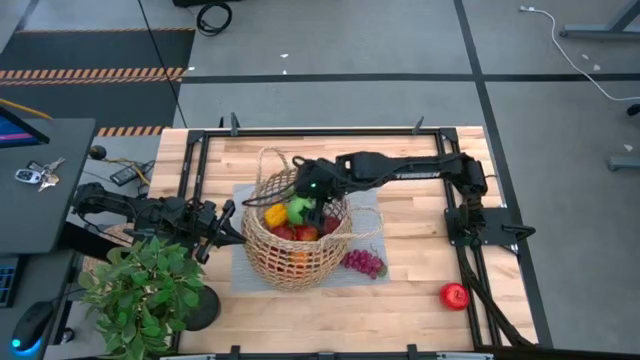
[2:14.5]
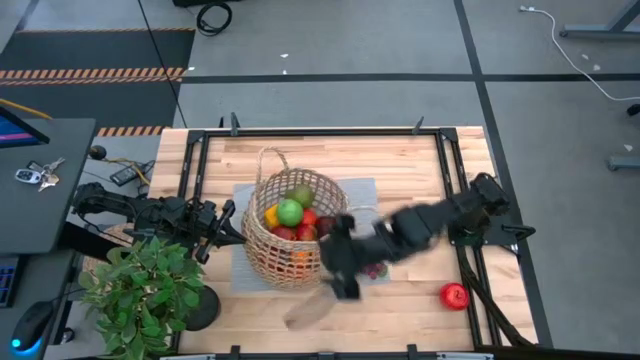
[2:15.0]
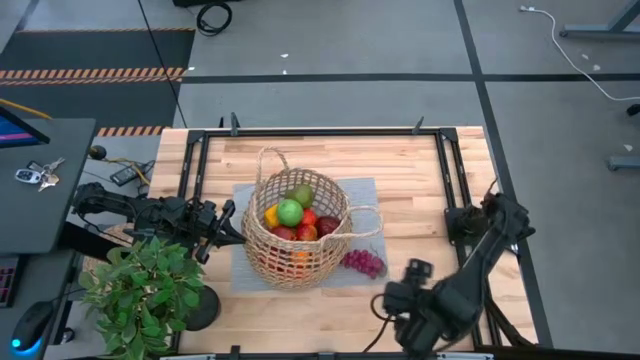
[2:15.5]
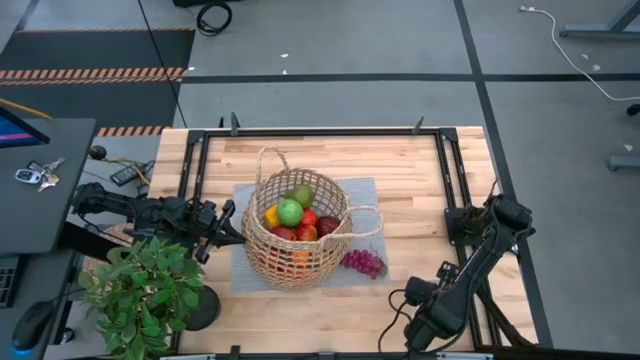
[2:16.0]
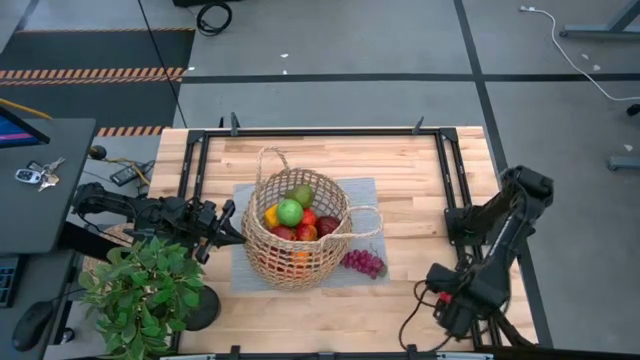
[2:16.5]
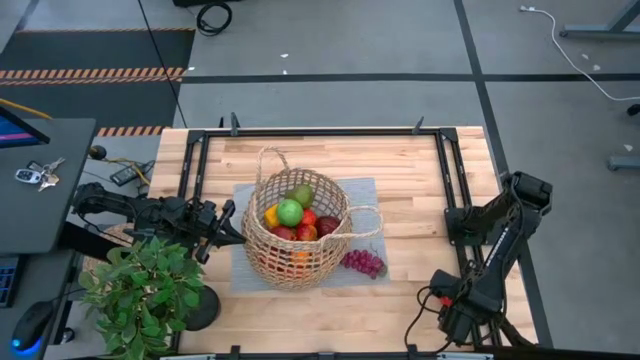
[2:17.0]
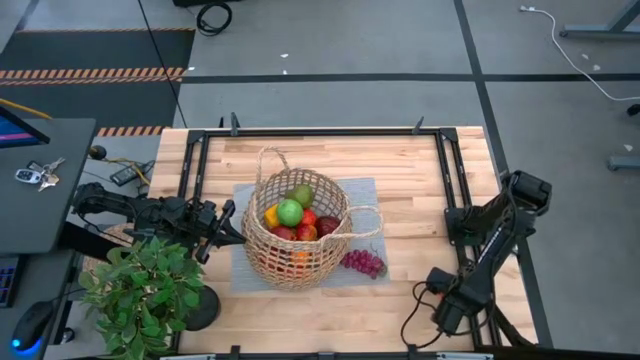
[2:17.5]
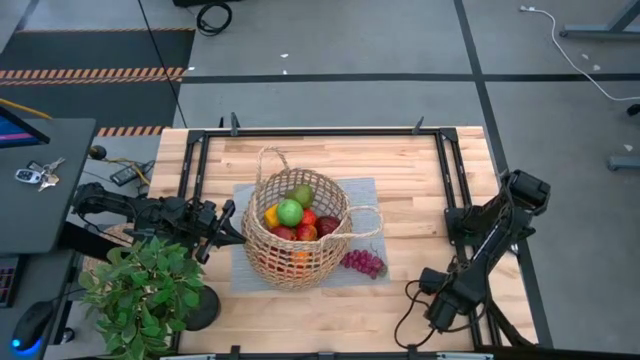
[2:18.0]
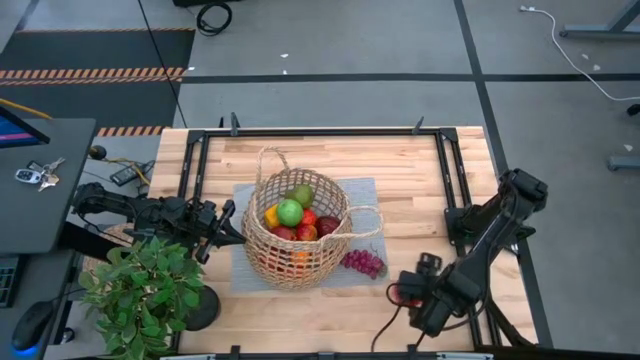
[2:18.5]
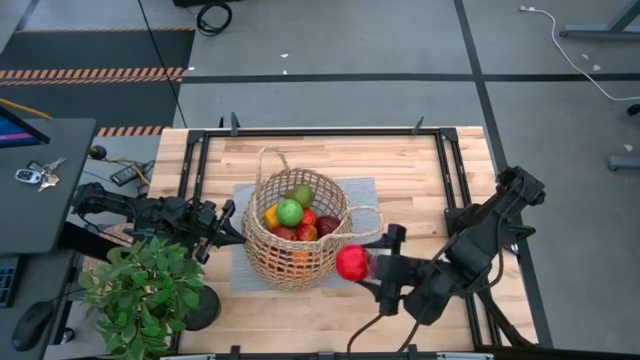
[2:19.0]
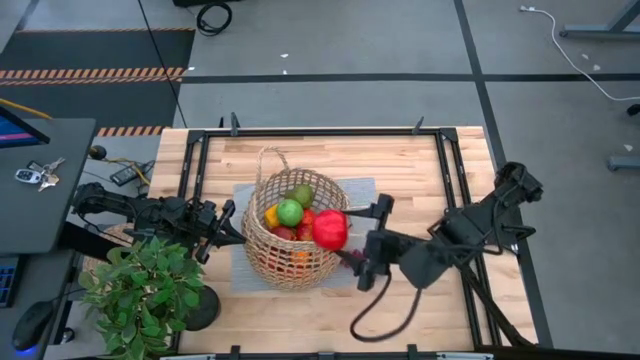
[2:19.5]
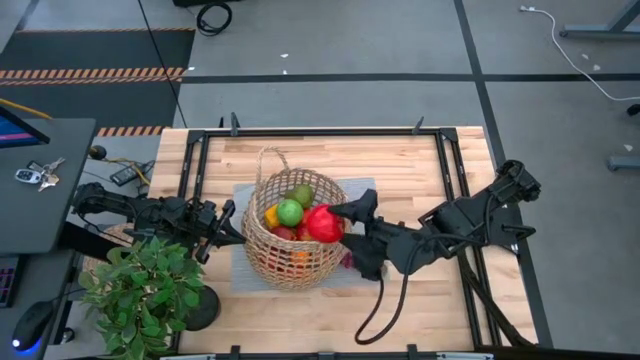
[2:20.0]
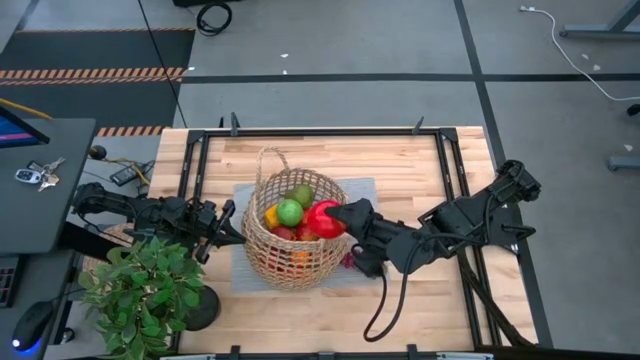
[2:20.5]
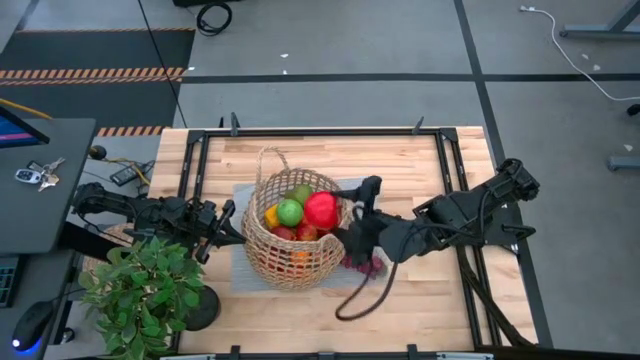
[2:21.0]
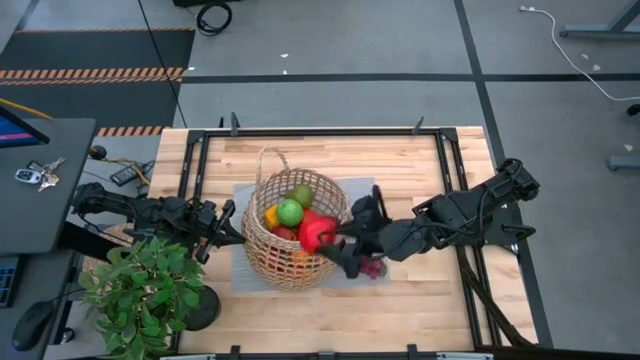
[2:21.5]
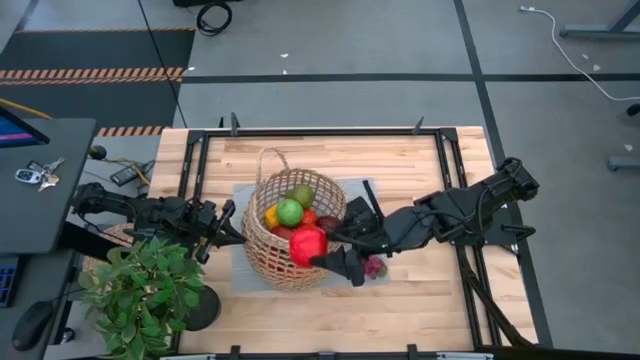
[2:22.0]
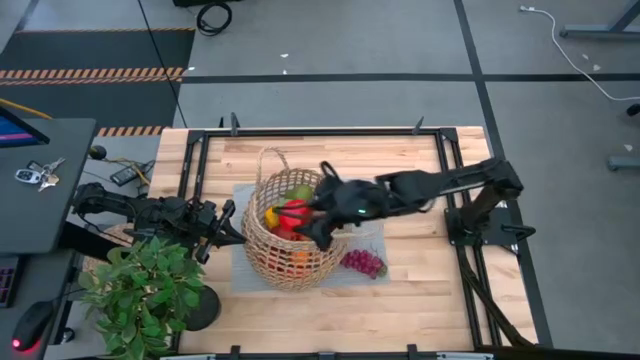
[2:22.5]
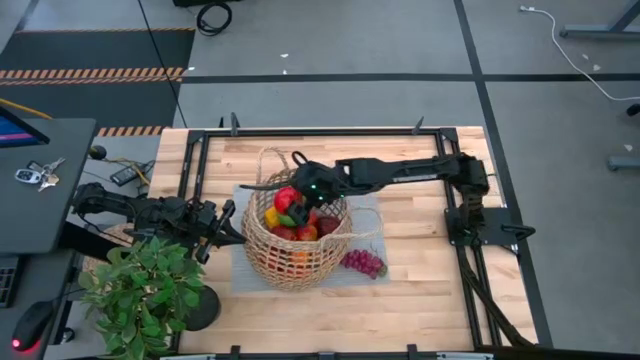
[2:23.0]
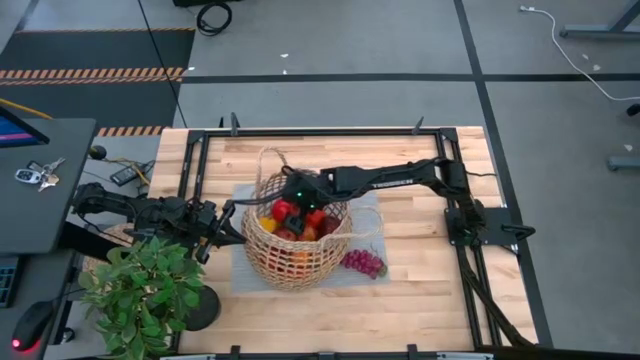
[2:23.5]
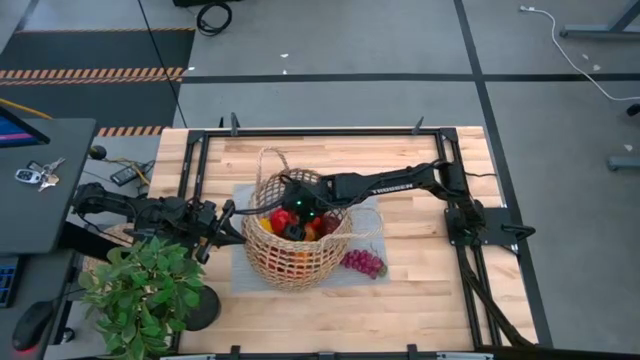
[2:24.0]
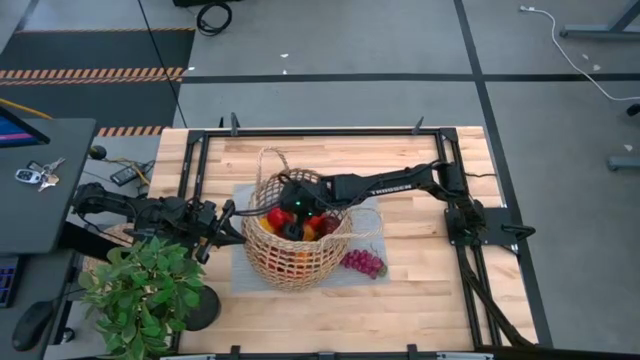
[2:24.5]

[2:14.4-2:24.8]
Task: Build produce basket
Put the red apple into the basket

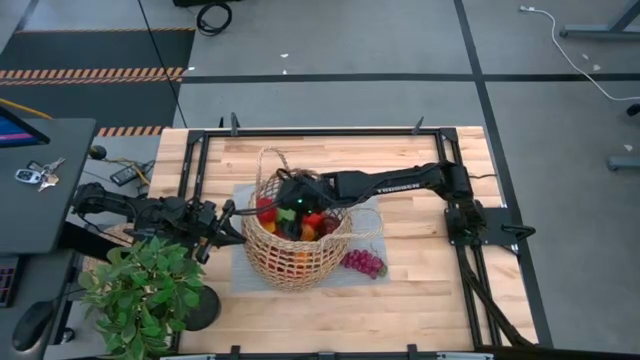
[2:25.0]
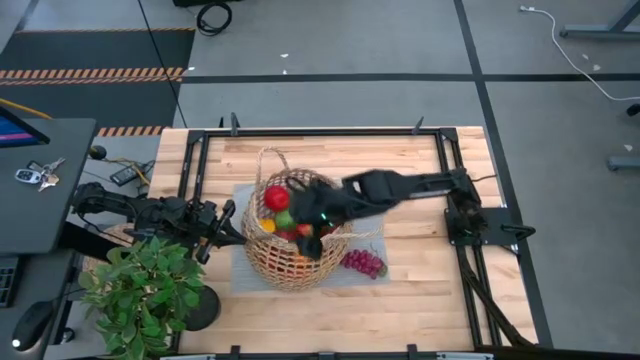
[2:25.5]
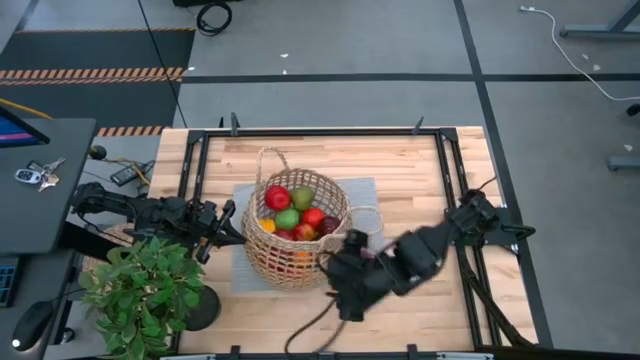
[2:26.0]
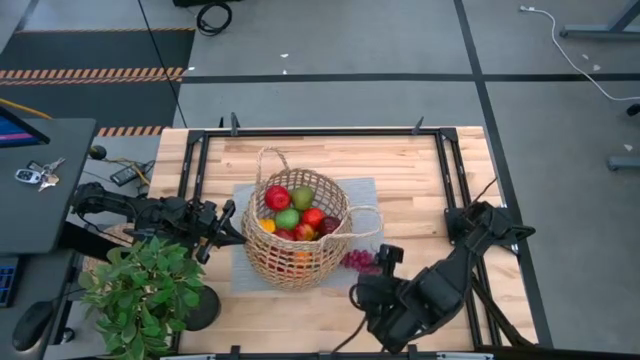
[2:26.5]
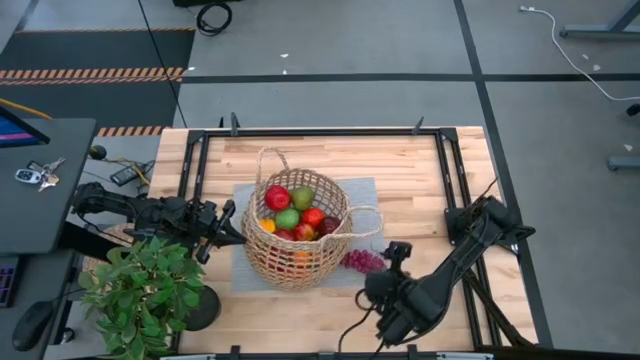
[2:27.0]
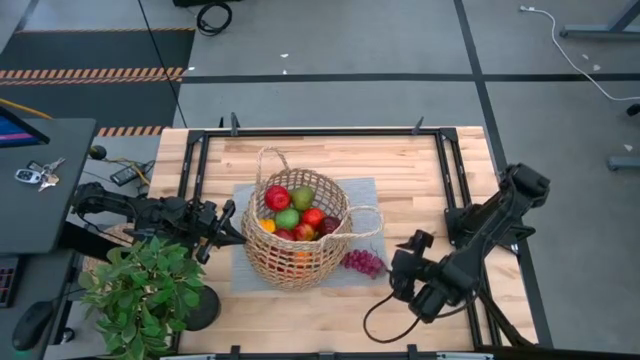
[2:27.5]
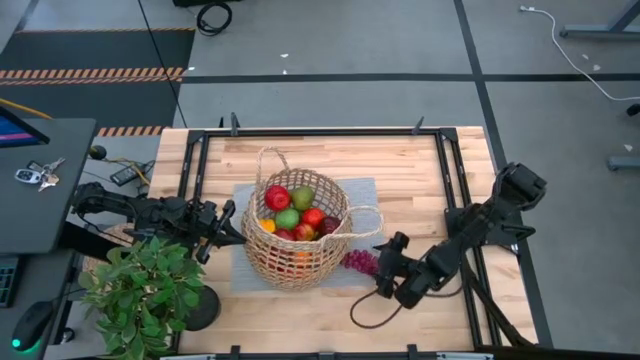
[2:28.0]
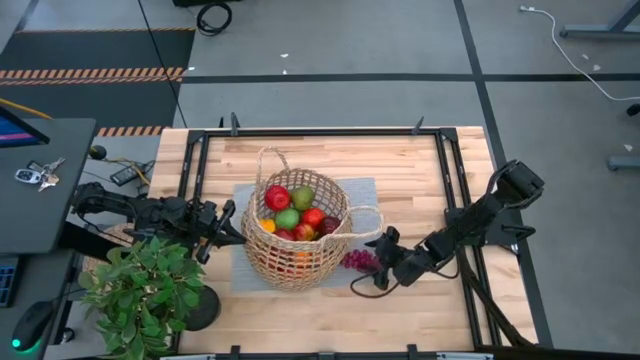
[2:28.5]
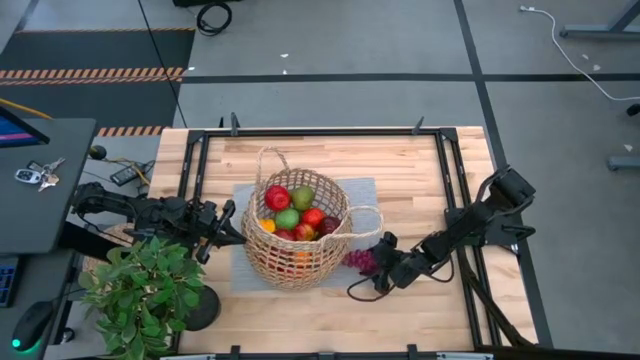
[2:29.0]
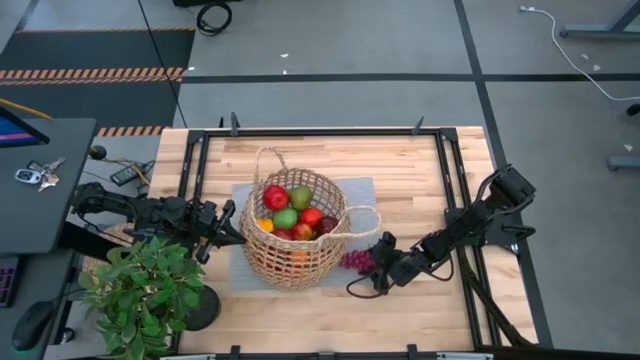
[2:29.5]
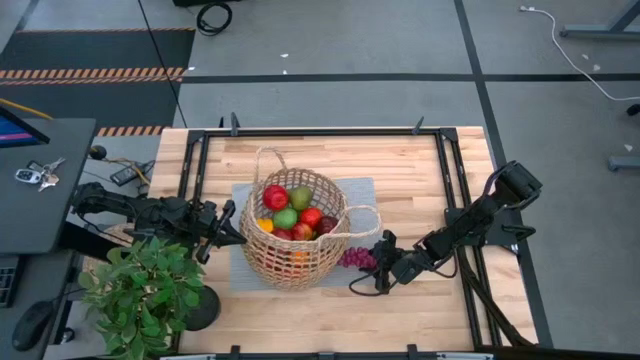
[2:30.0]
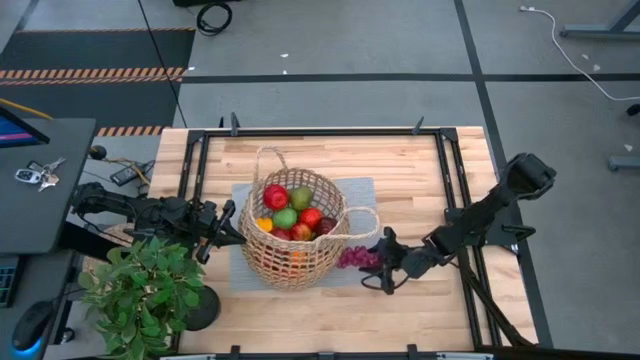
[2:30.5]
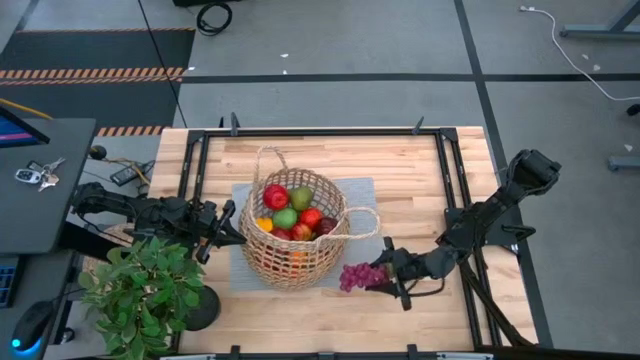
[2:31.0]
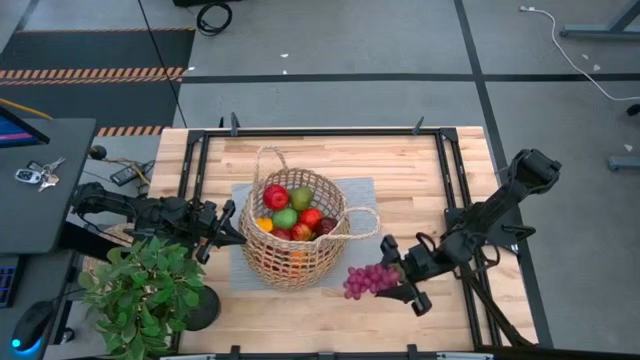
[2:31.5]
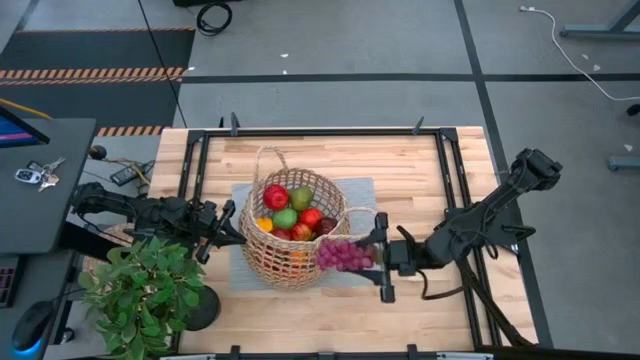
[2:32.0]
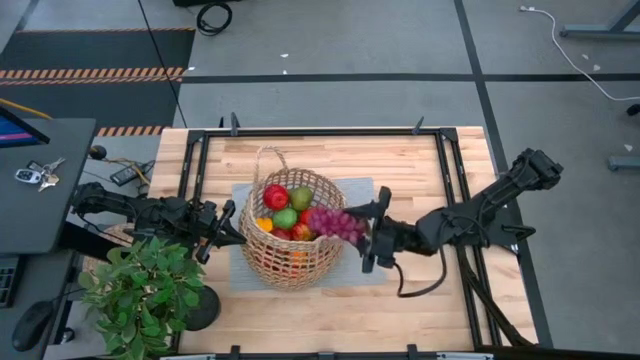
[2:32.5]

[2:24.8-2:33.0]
Put the purple grapes into the basket
